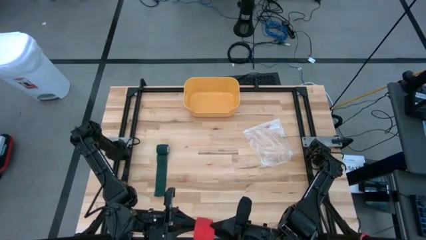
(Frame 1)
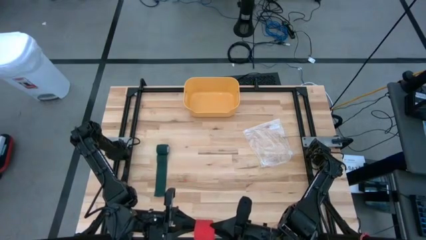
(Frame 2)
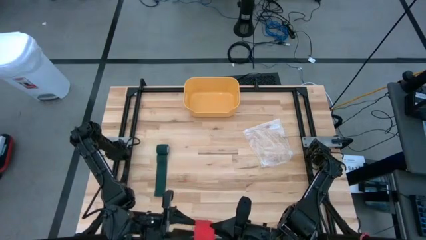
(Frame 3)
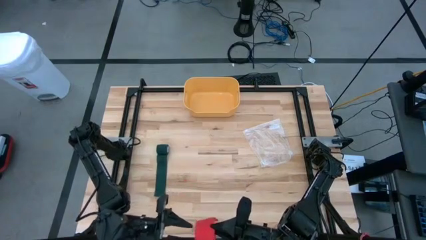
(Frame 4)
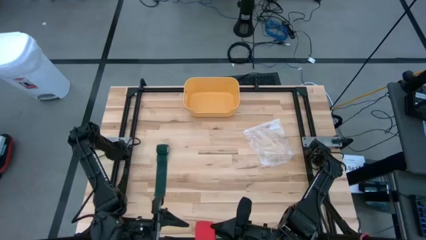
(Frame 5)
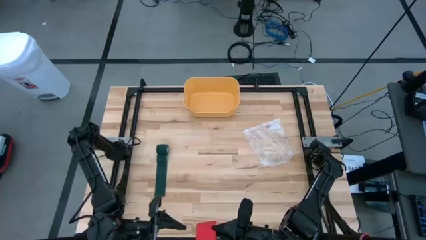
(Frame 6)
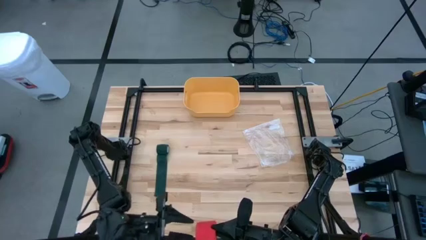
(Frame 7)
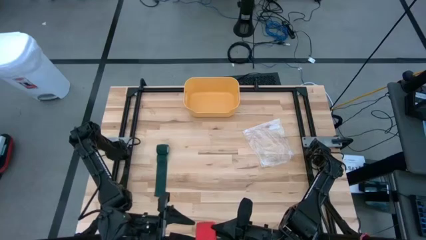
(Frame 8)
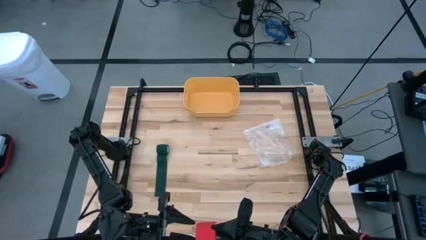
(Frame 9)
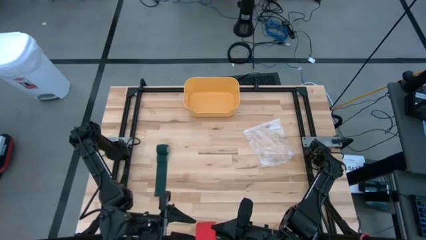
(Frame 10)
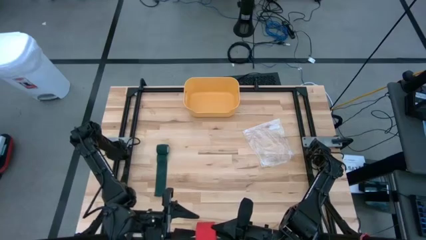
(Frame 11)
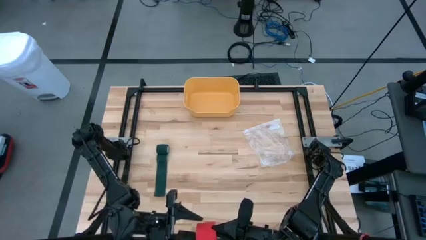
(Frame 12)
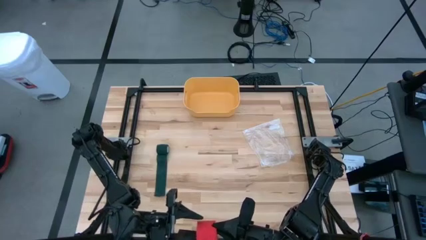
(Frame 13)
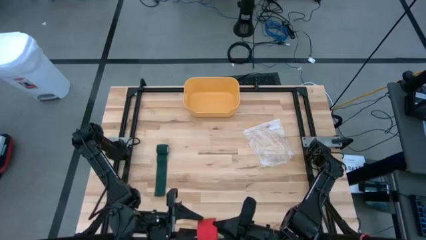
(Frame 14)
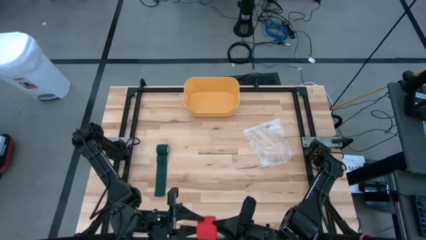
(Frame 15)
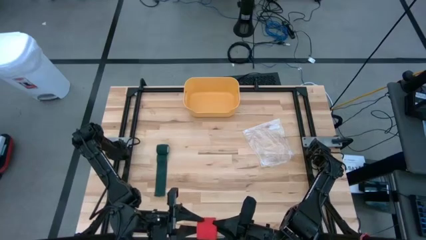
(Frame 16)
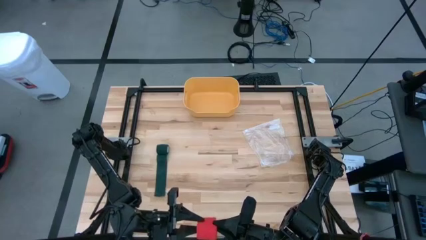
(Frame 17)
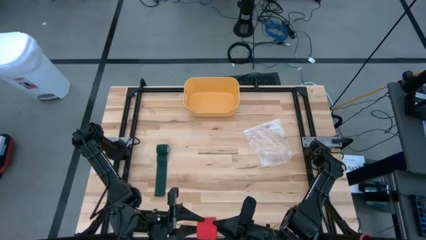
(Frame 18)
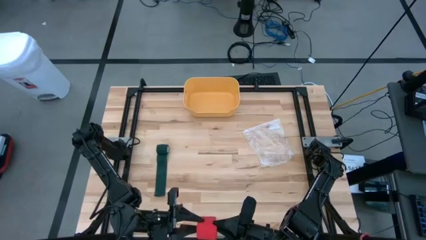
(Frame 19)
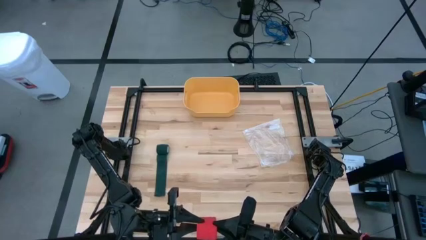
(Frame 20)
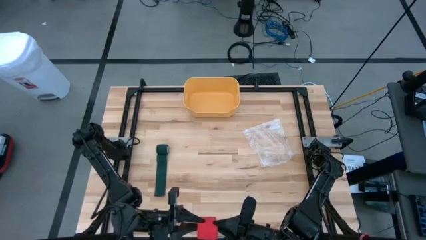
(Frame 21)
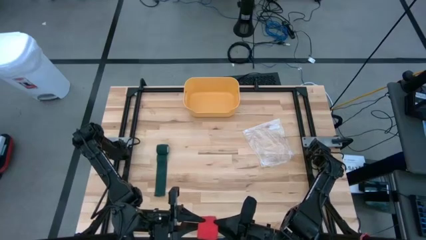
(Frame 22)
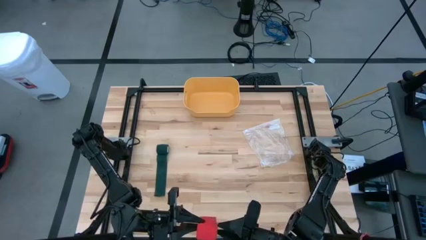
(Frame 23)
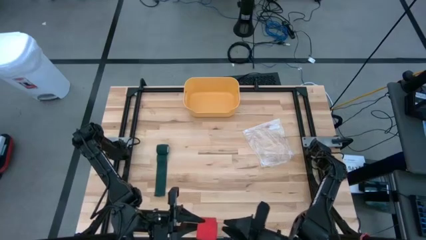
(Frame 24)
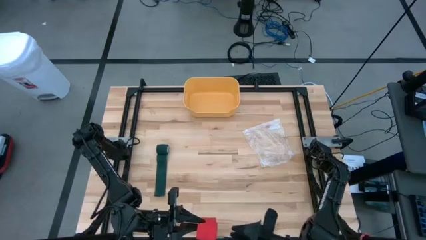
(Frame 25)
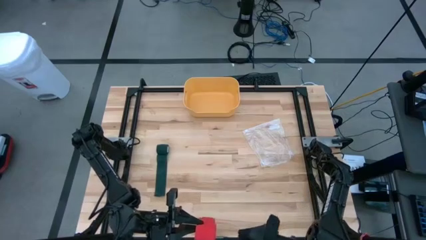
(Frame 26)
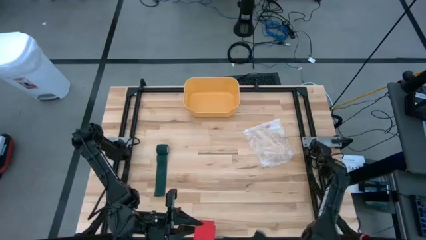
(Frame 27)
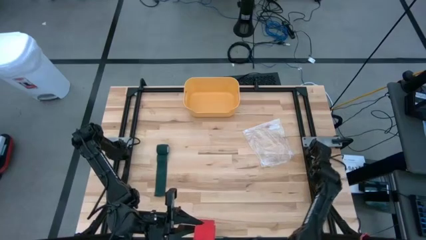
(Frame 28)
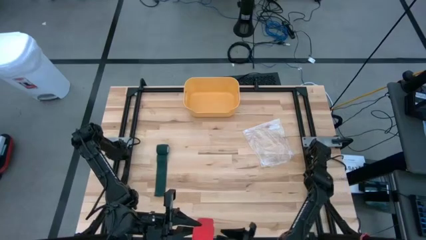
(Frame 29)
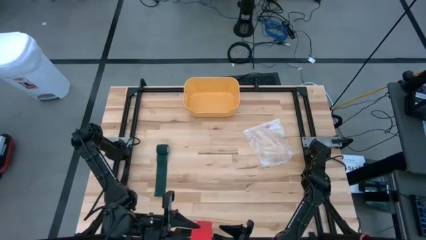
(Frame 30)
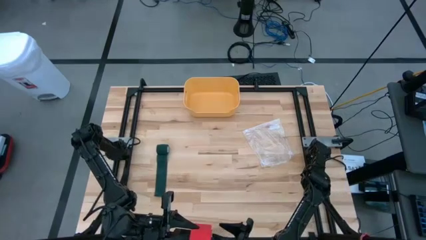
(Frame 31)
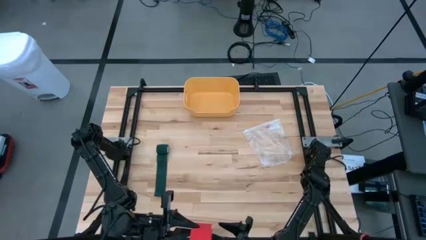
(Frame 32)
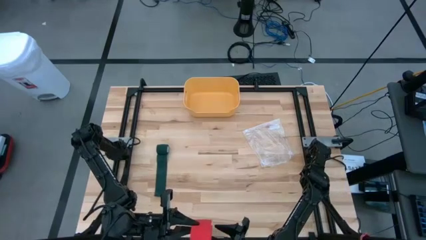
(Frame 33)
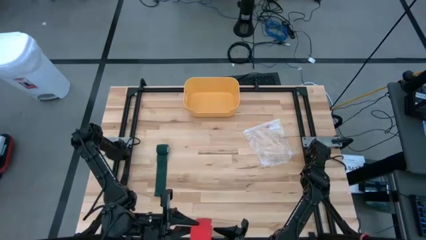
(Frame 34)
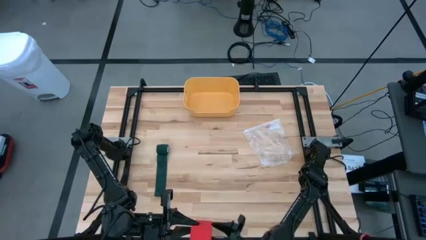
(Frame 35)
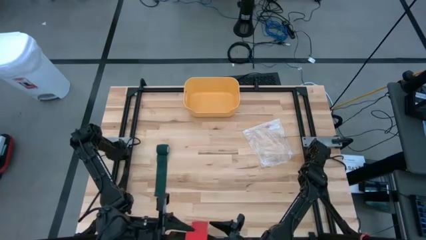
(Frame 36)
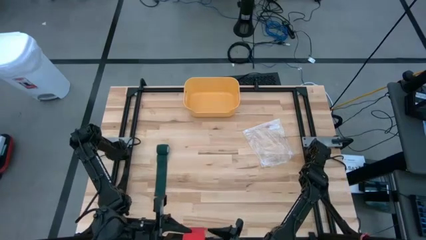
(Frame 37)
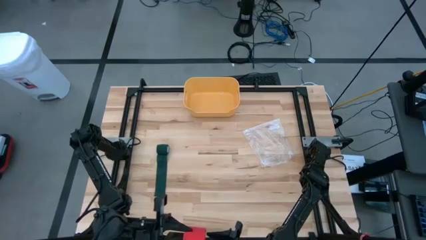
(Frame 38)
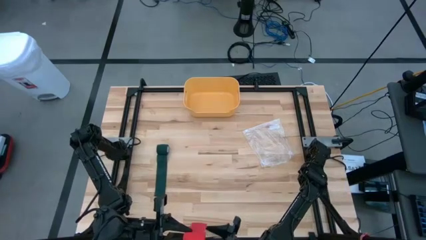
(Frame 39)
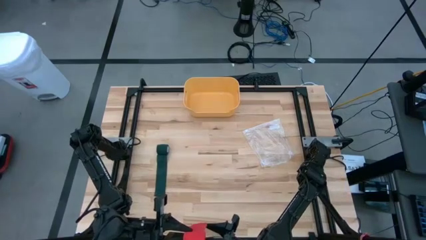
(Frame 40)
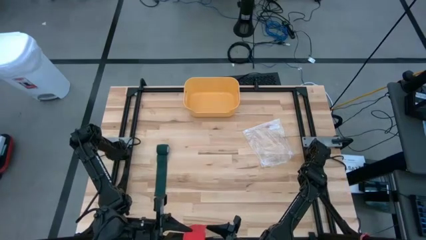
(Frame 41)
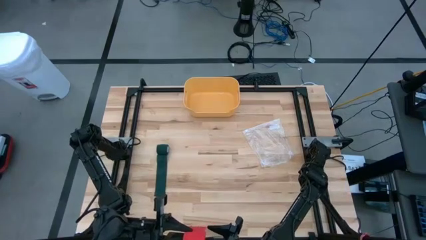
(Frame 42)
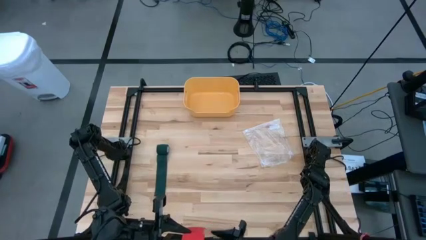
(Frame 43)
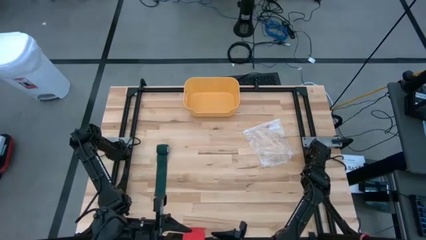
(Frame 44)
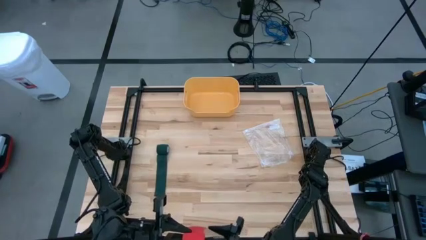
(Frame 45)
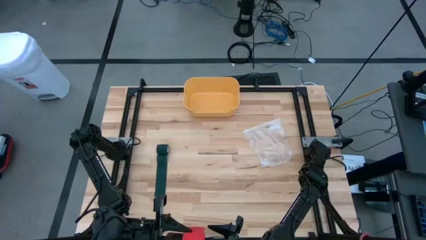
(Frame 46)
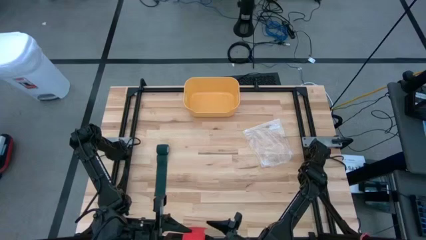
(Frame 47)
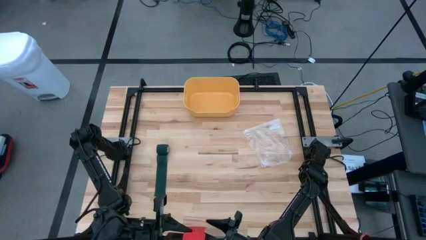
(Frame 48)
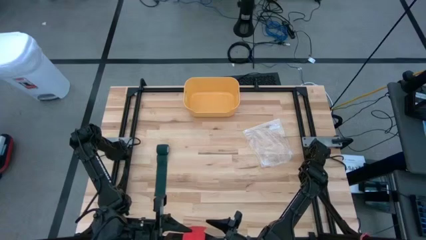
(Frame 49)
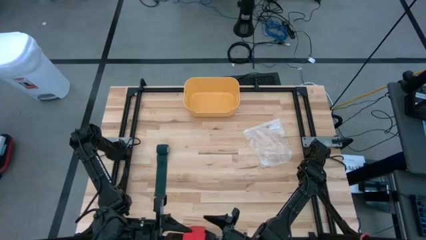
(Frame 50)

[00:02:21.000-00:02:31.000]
Task: Roll bandage
Roll the red bandage

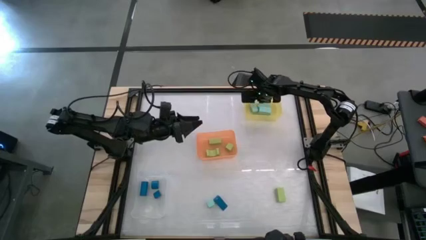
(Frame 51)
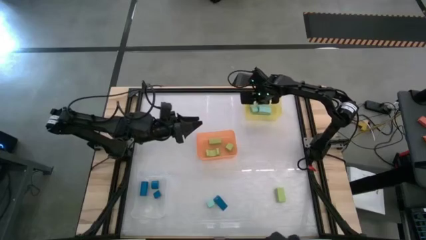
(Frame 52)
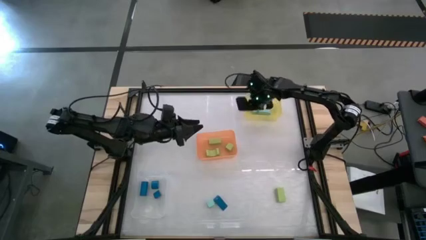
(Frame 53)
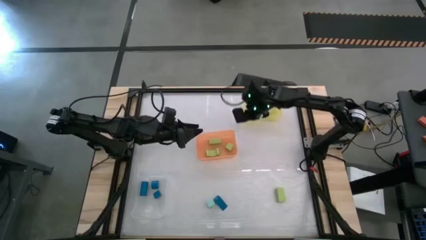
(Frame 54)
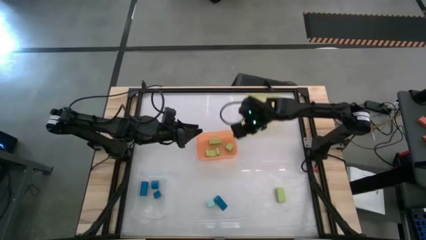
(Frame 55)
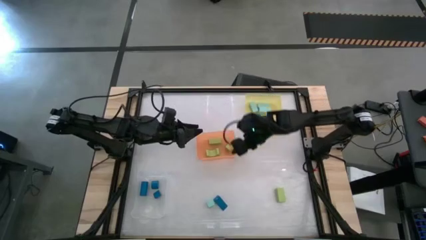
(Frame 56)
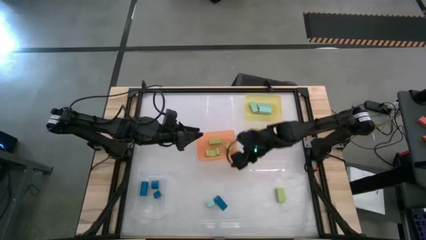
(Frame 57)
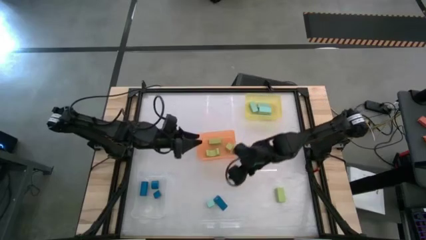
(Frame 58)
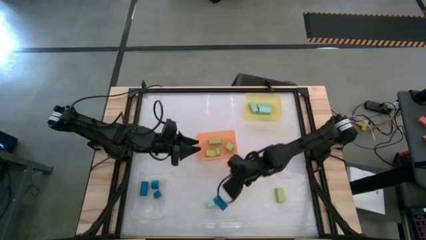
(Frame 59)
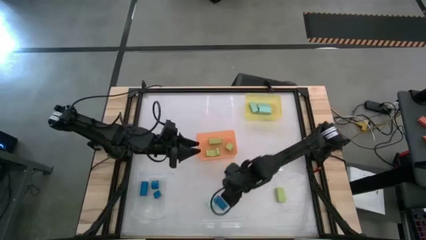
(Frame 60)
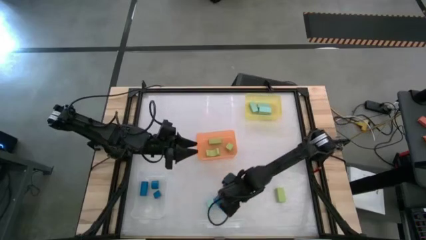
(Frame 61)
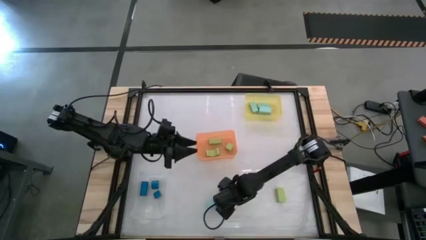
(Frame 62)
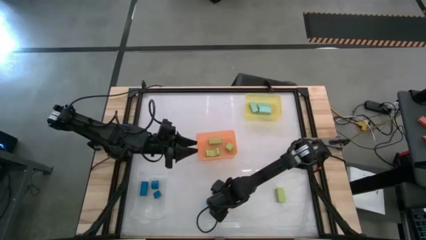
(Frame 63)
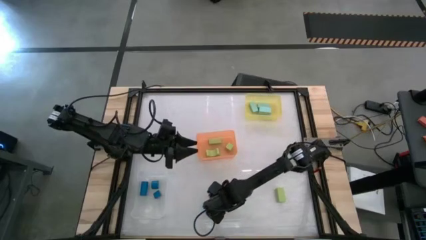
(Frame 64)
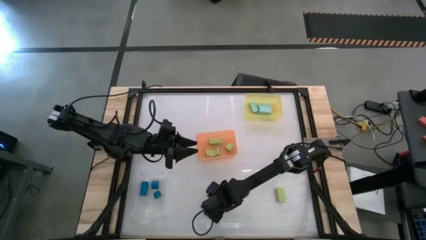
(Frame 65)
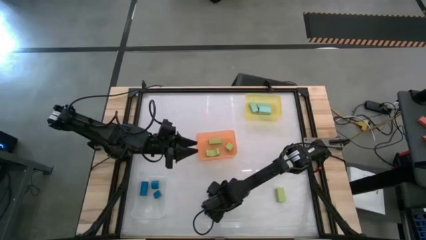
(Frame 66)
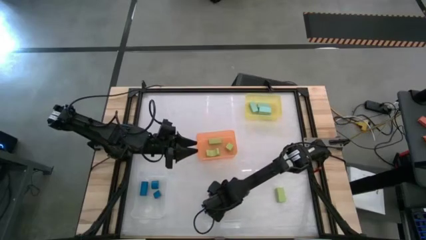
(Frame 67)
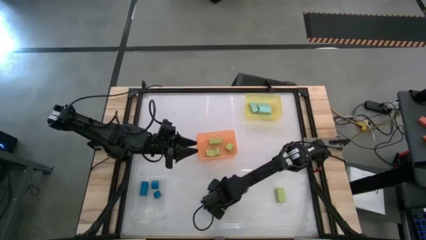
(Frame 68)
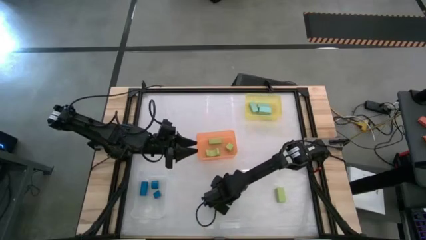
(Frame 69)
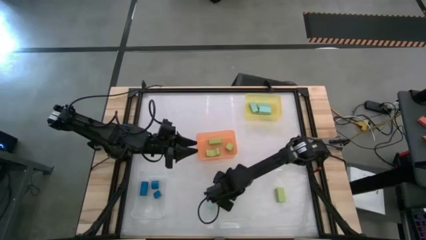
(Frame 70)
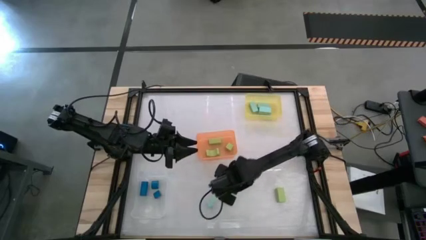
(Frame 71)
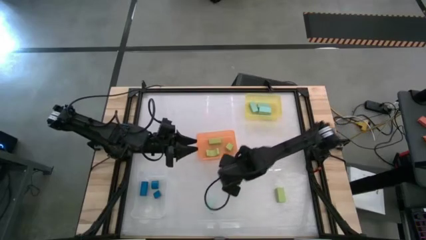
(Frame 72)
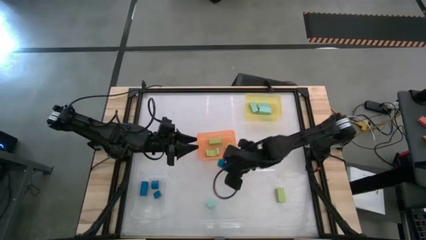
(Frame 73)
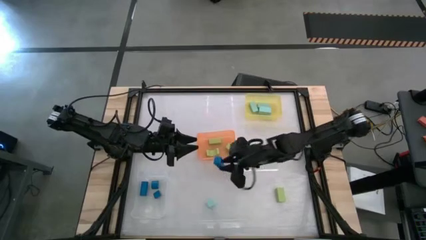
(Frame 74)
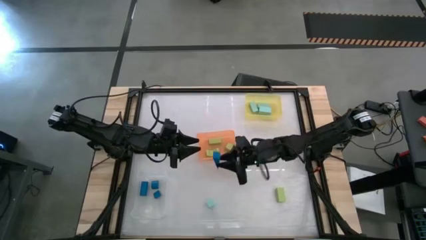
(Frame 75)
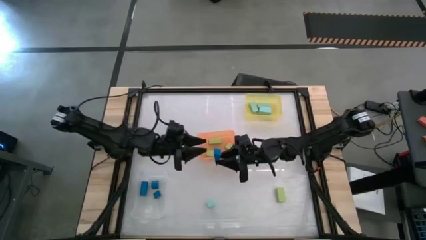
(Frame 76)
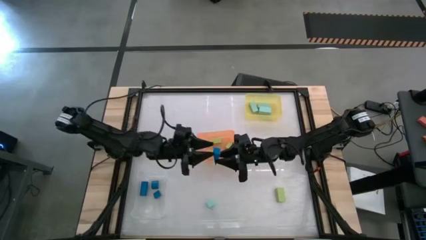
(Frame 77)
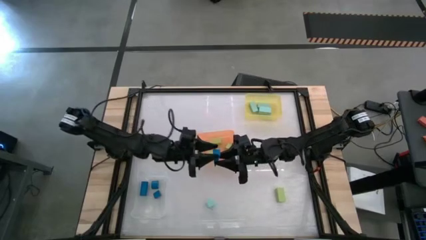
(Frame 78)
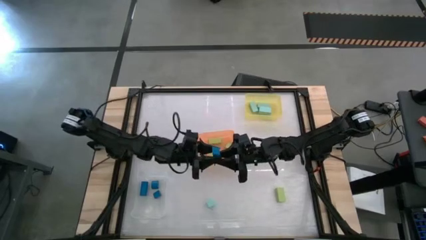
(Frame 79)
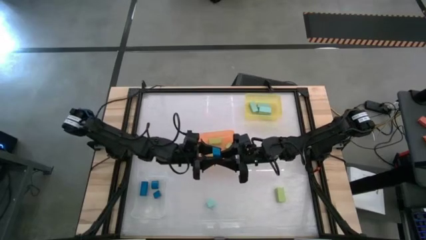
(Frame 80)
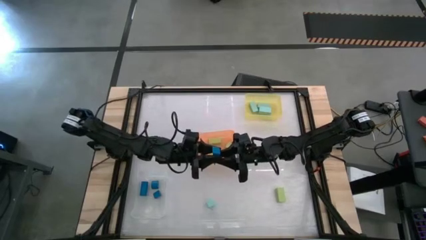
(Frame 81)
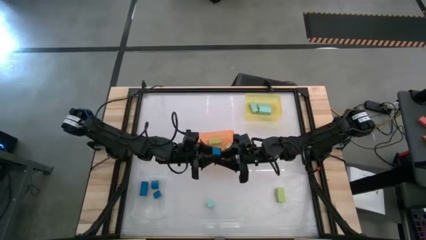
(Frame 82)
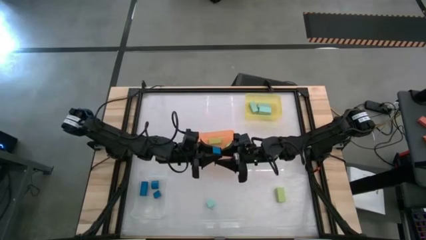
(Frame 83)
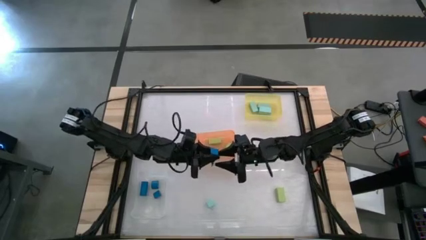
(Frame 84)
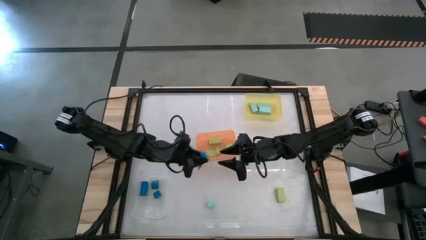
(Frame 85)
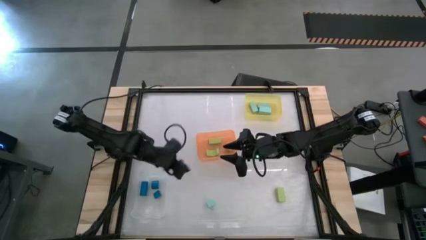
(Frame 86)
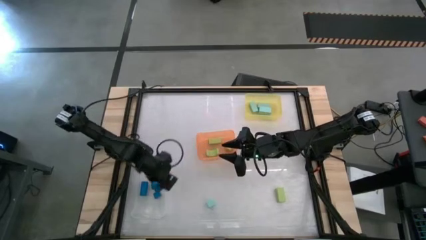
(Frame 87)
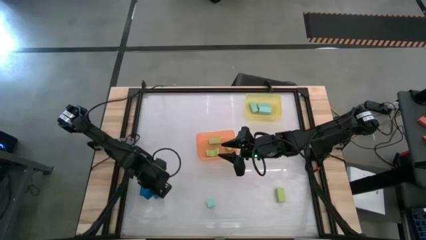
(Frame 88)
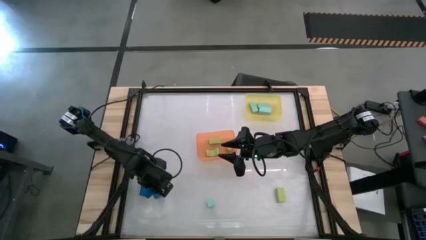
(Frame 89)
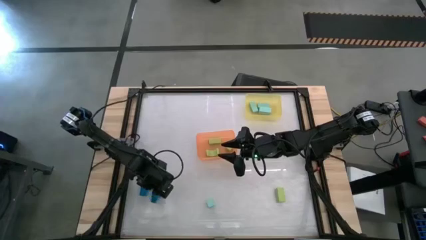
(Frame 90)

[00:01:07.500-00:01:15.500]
Task: Sort & place blocks by color
Put the blue block into the transparent bin
